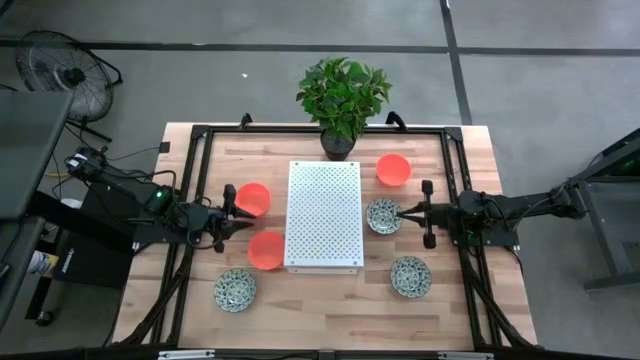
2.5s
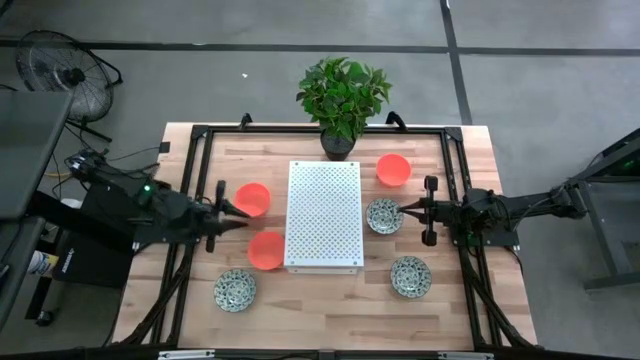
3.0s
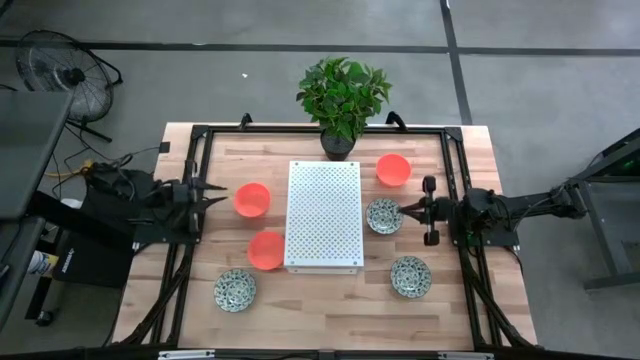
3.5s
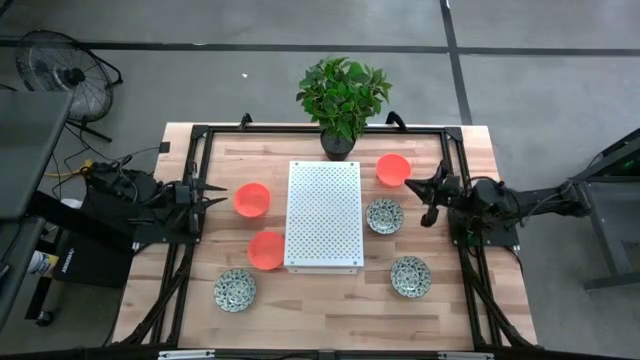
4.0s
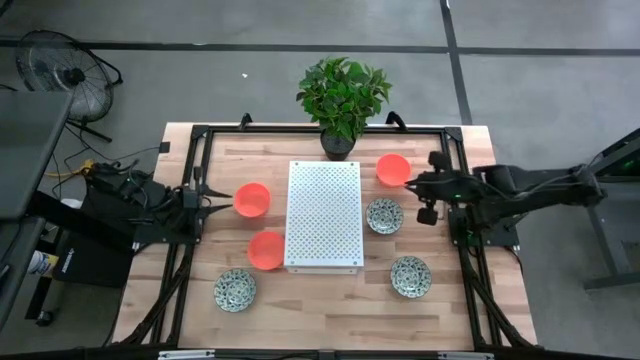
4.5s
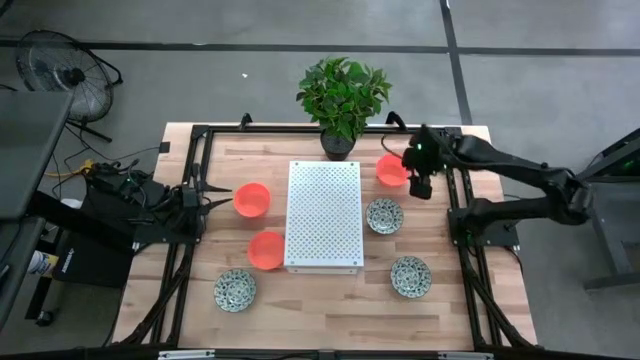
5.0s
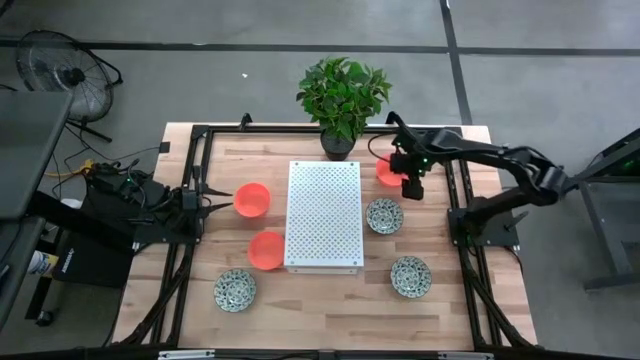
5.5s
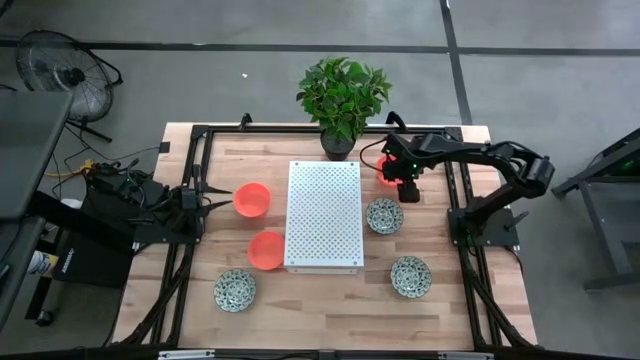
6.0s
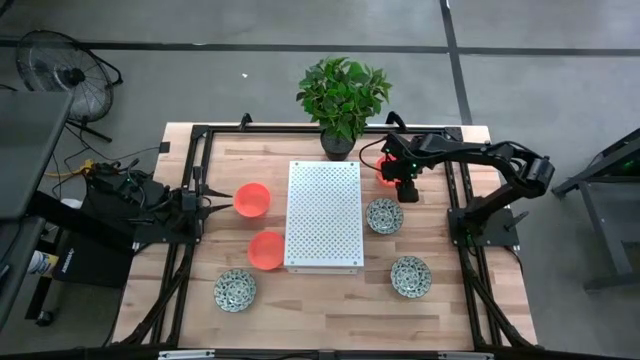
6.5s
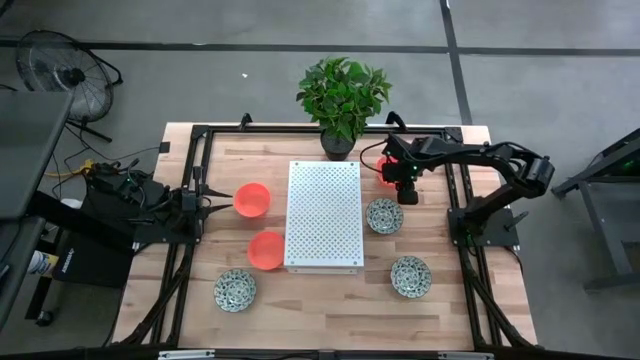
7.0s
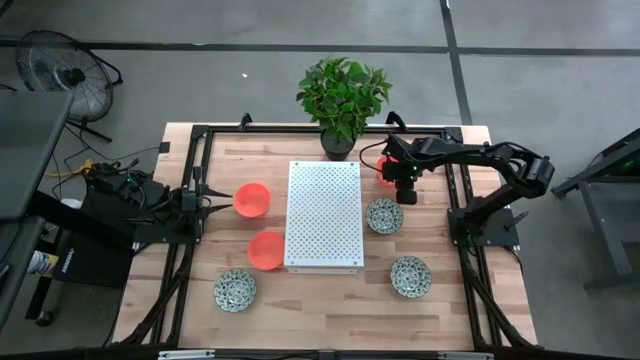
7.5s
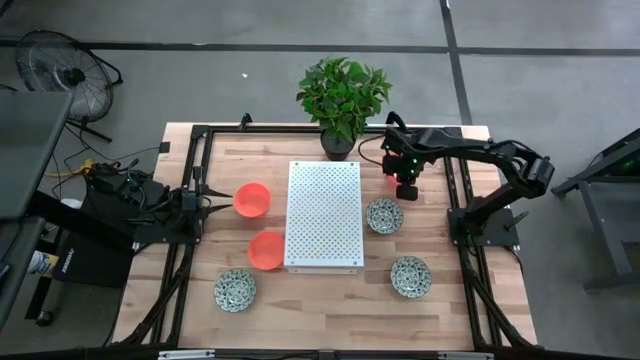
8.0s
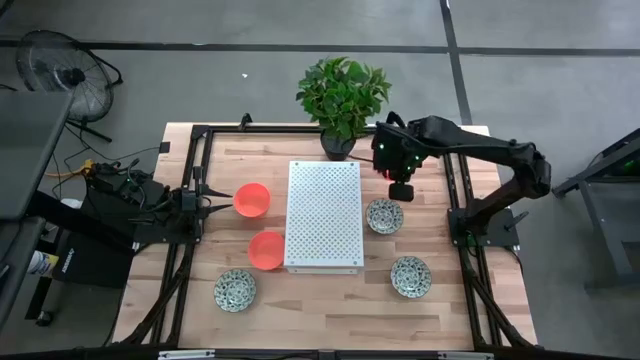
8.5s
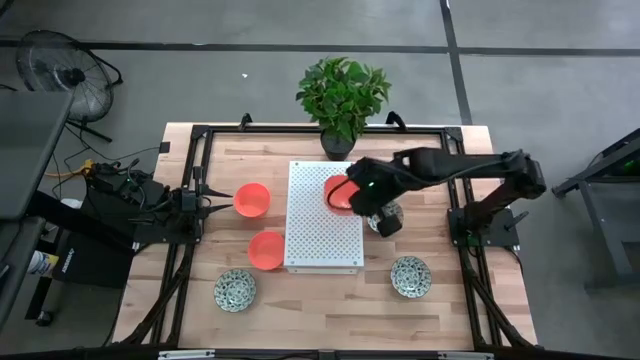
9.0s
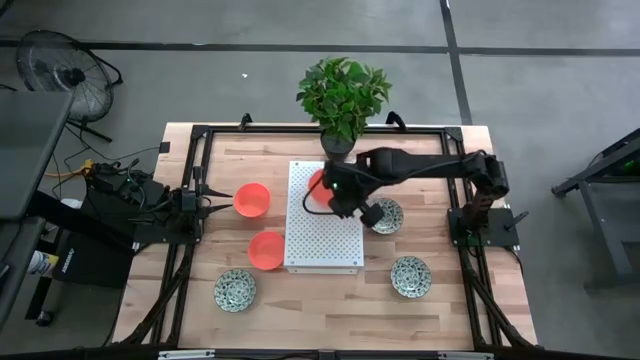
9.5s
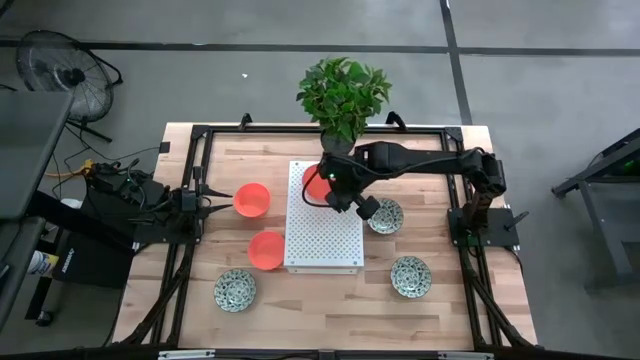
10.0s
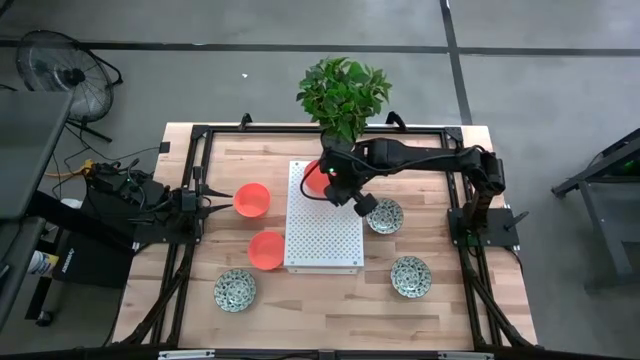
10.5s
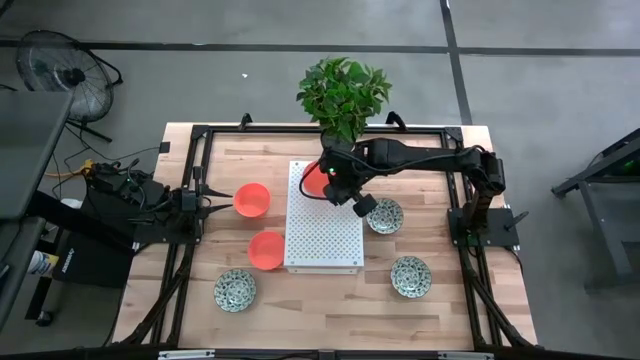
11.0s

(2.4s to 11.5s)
Task: Pick & Place Mini bowls
Put the top right orange bowl on the shelf

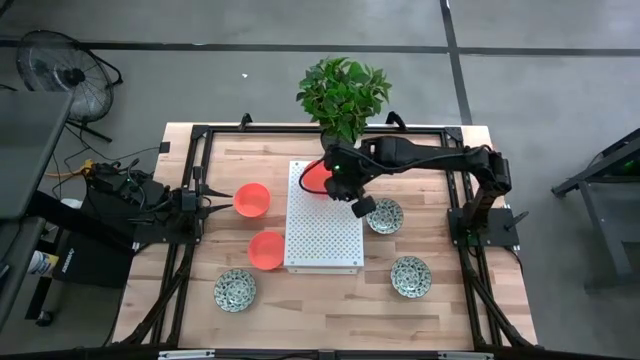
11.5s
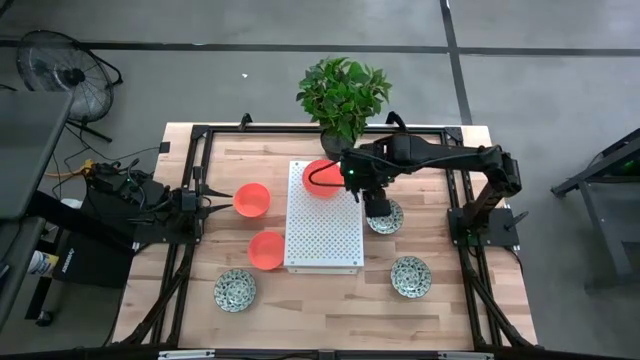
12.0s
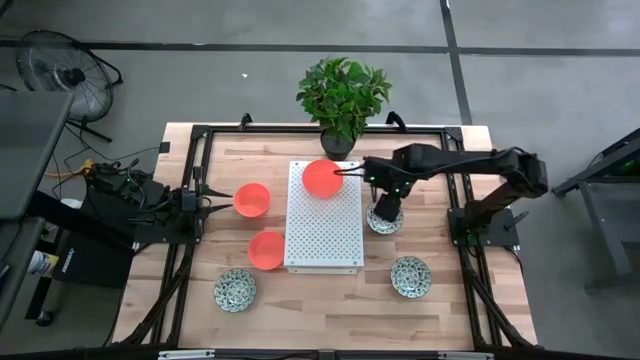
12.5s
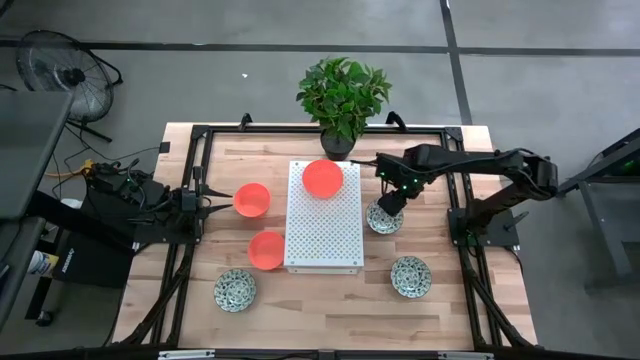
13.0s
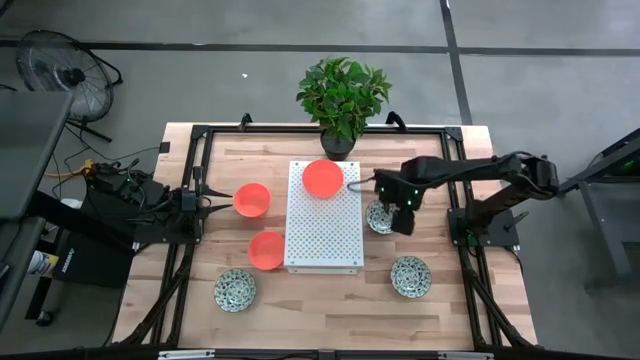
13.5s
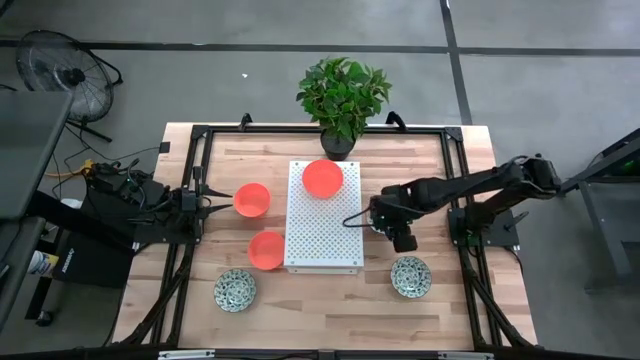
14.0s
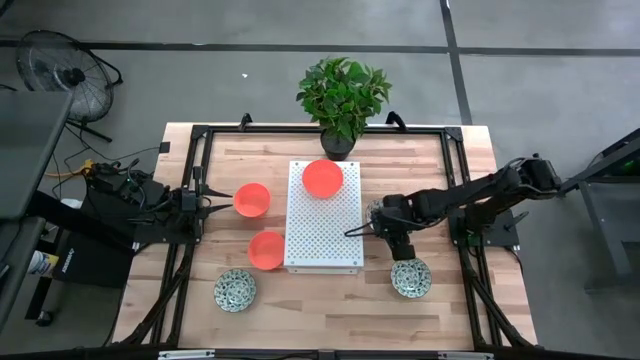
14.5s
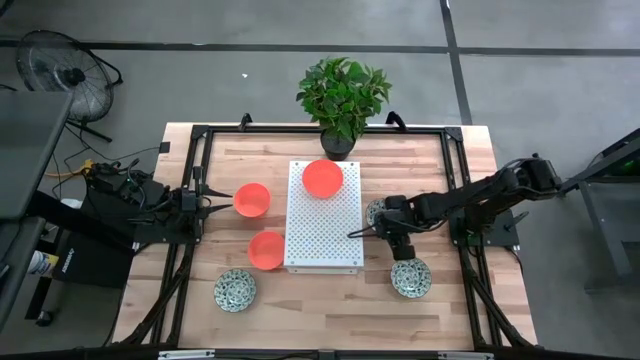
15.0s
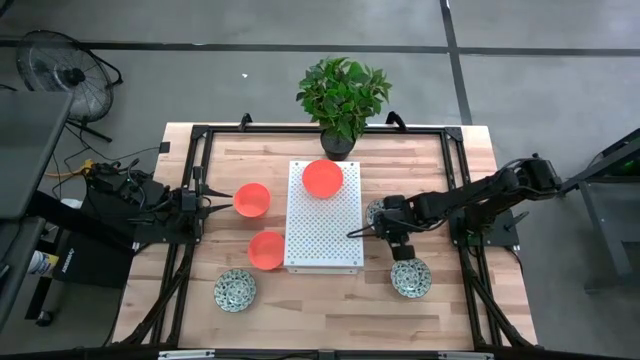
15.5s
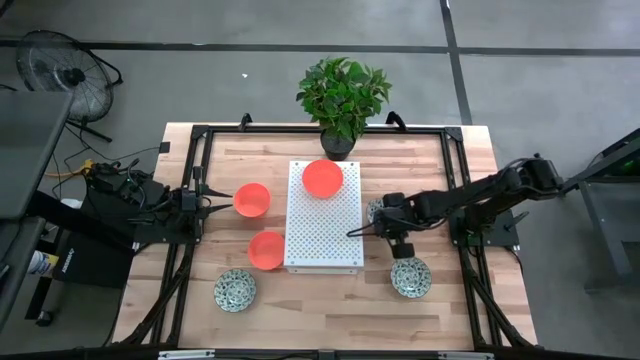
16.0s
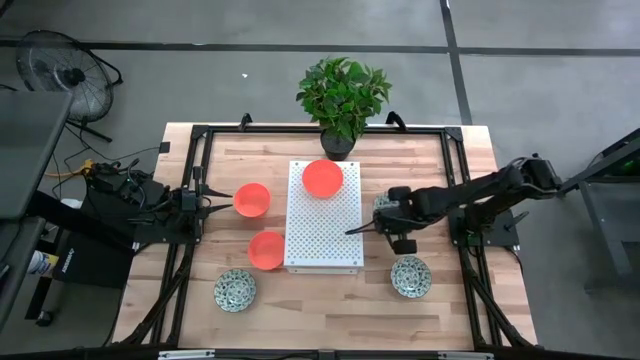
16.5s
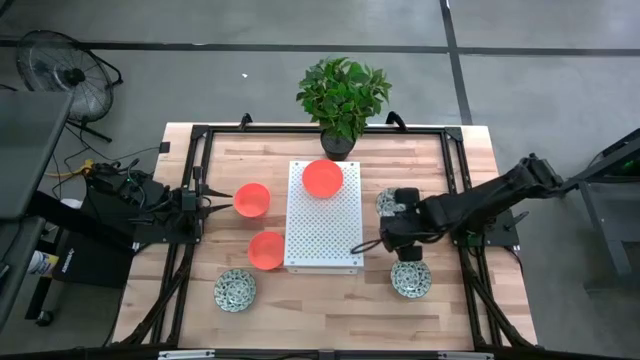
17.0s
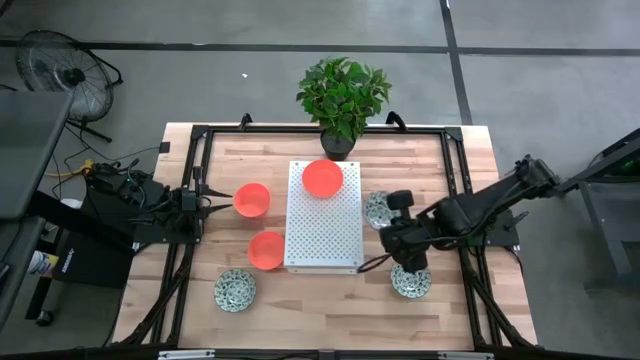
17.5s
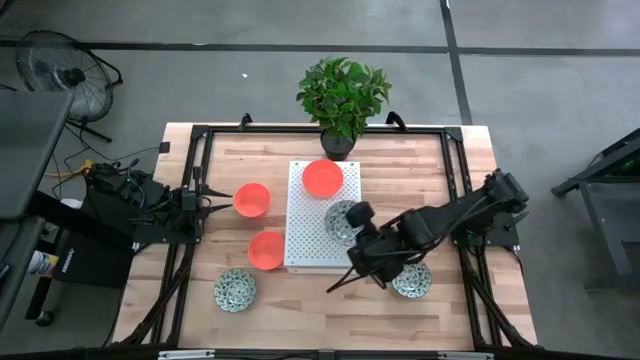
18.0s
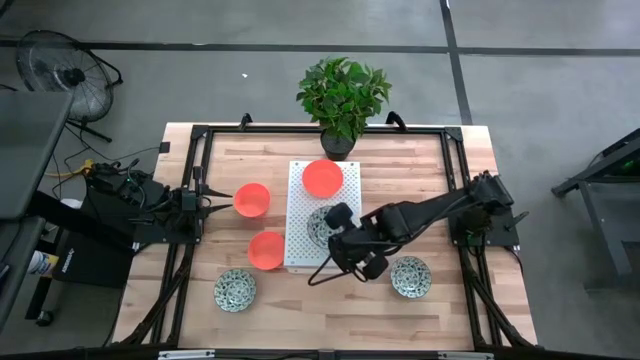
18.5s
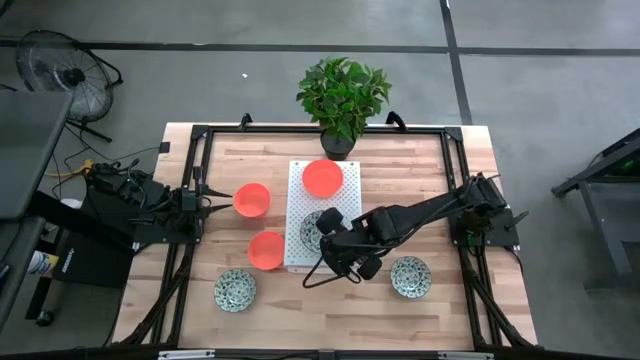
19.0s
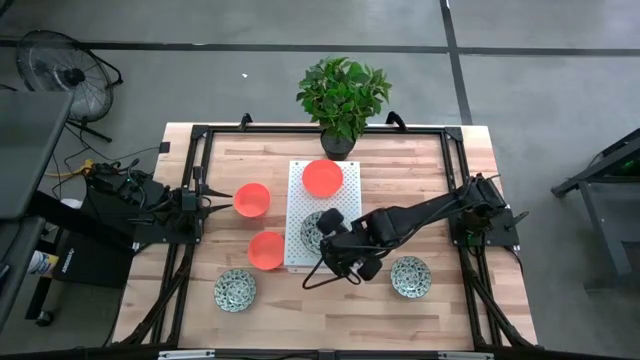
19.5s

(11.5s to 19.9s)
Put the top right green white bowl on the shelf

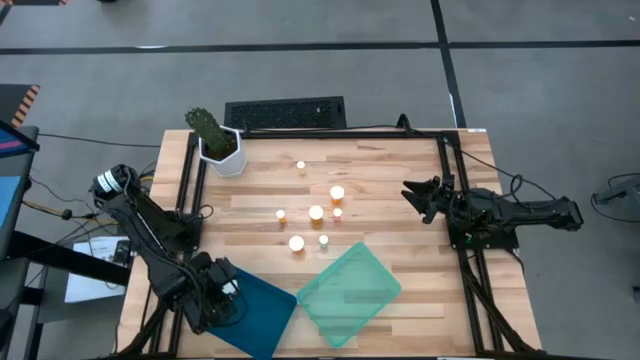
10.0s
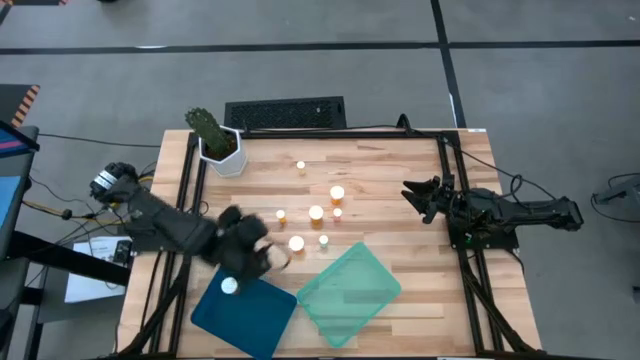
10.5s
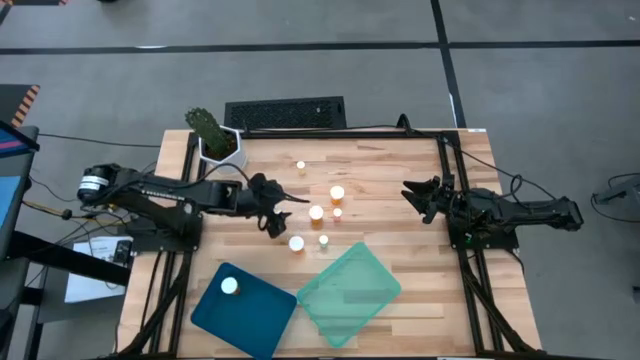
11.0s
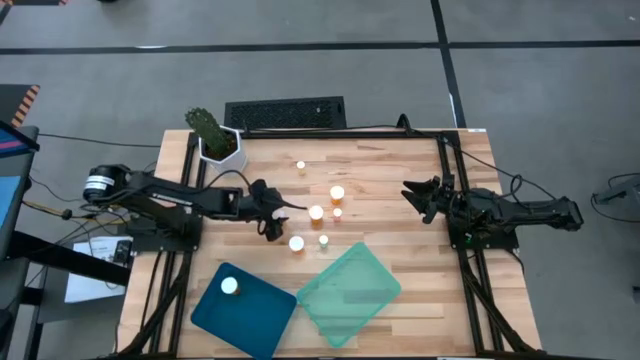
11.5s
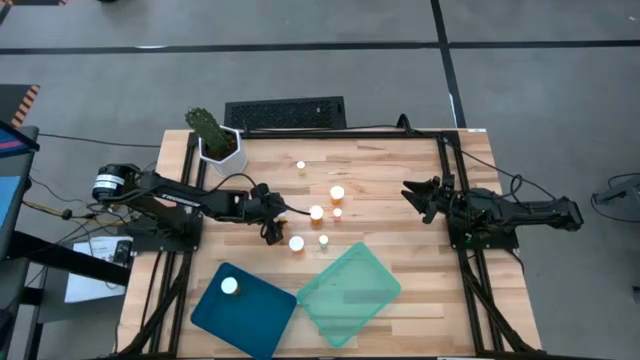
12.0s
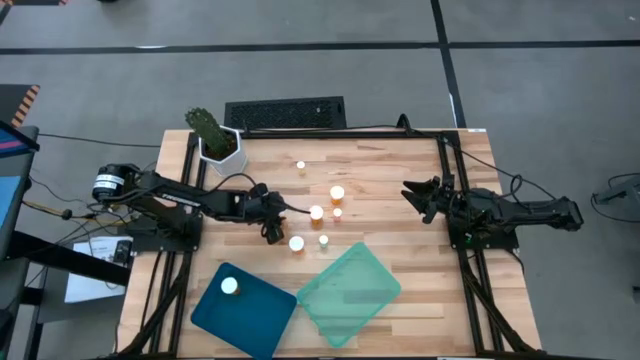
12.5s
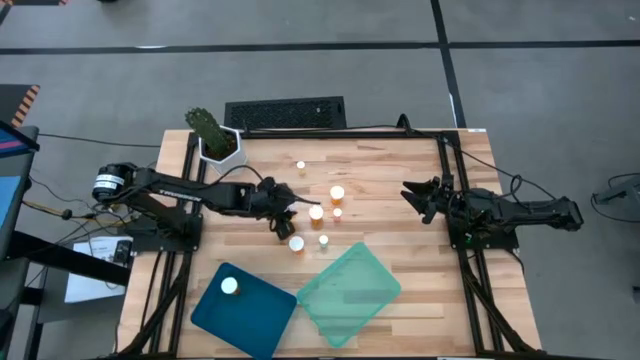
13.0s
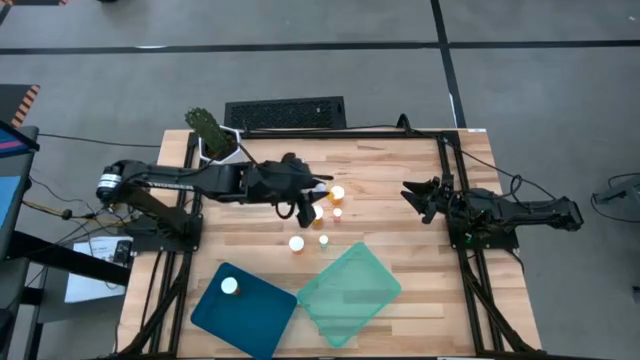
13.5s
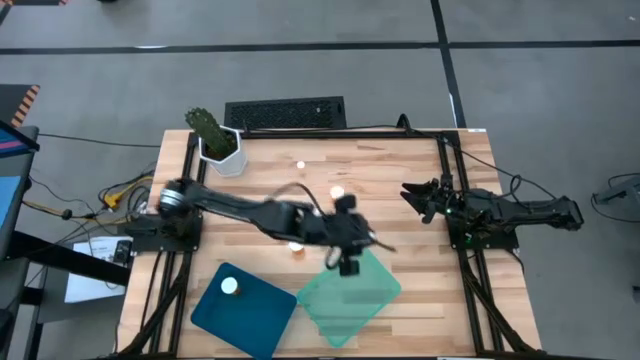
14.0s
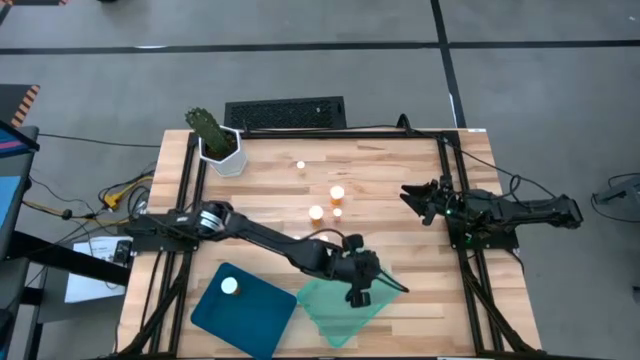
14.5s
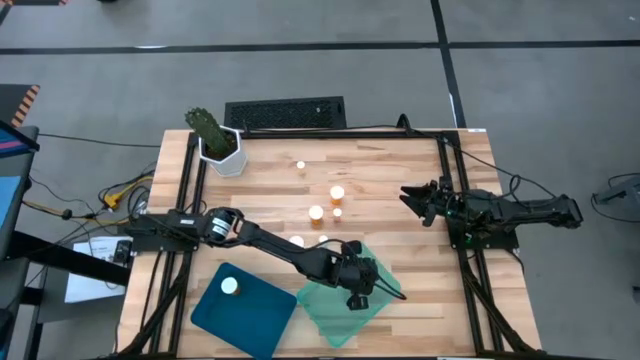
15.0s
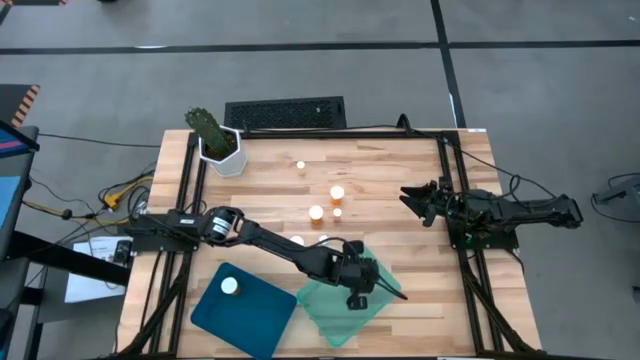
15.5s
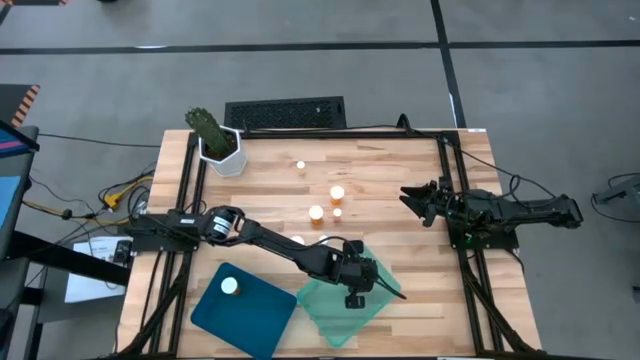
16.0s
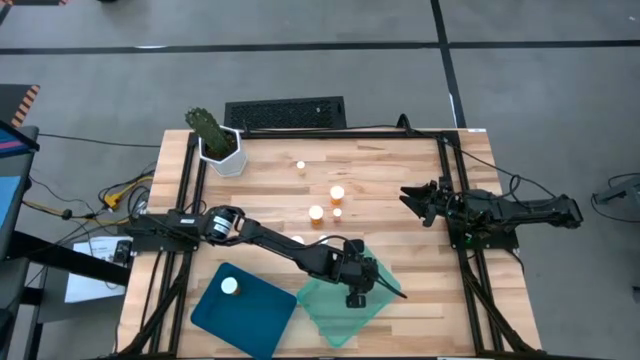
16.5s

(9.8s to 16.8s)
Task: Pick and place medicine bottles into bin by pill shape (circle, oval)
Put the small orange pill bottle into the green bin
